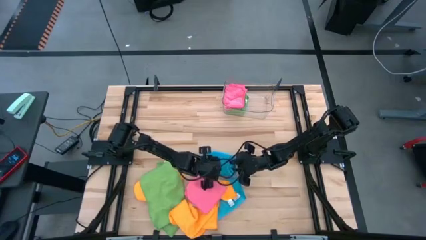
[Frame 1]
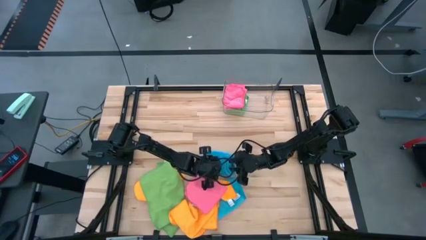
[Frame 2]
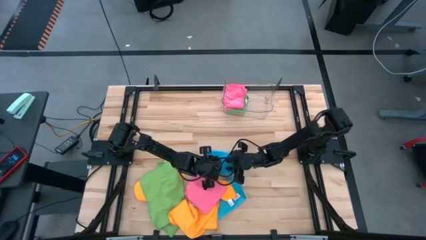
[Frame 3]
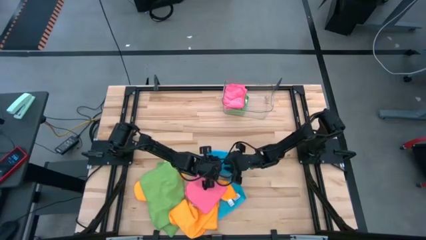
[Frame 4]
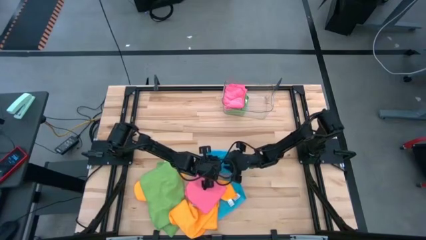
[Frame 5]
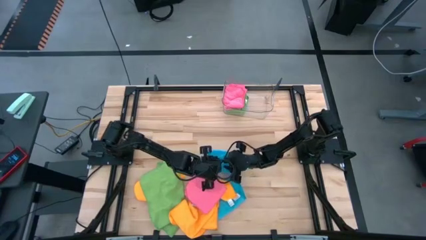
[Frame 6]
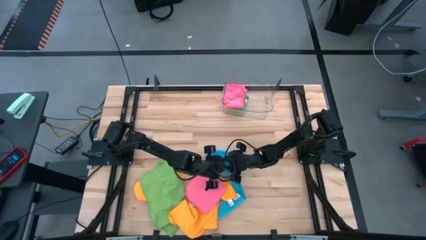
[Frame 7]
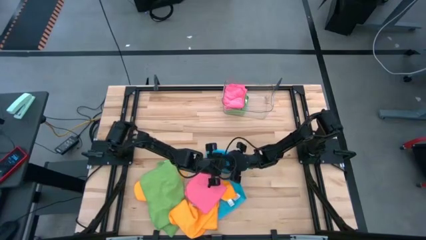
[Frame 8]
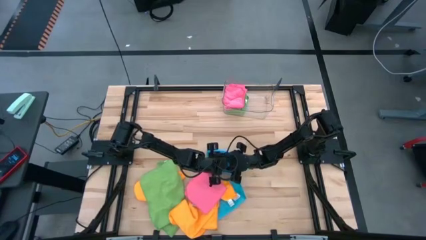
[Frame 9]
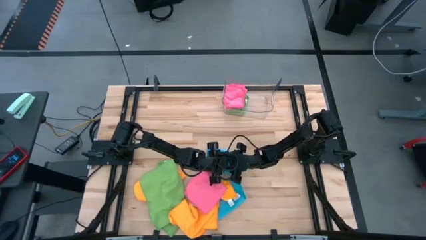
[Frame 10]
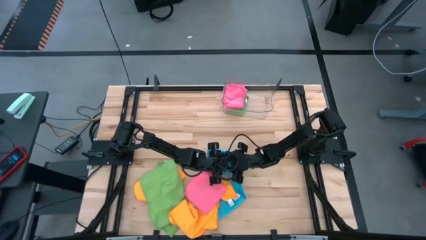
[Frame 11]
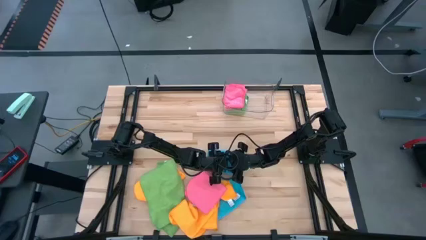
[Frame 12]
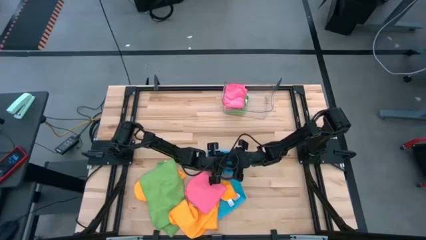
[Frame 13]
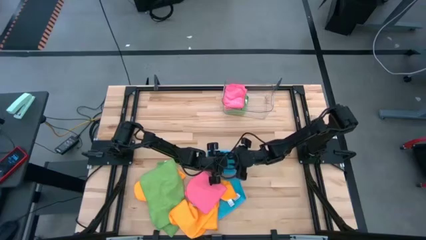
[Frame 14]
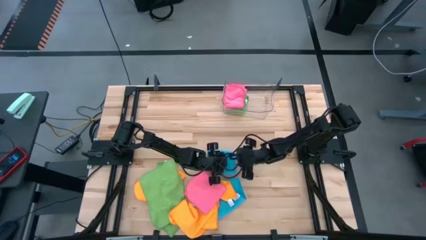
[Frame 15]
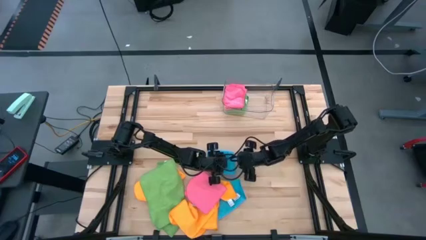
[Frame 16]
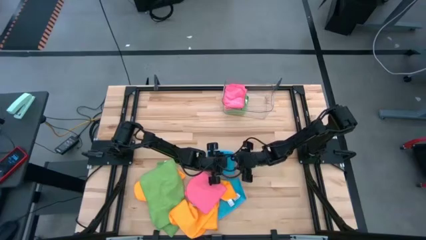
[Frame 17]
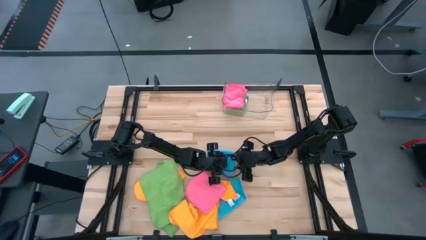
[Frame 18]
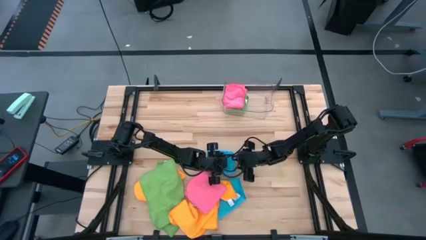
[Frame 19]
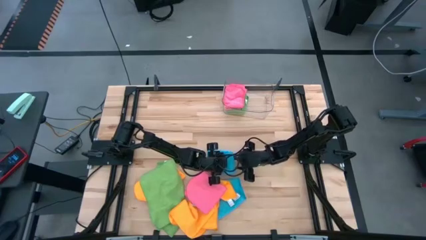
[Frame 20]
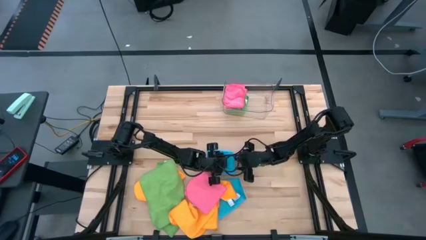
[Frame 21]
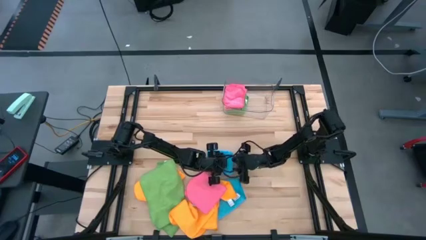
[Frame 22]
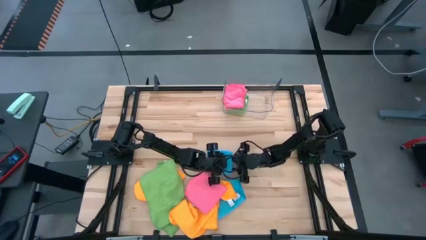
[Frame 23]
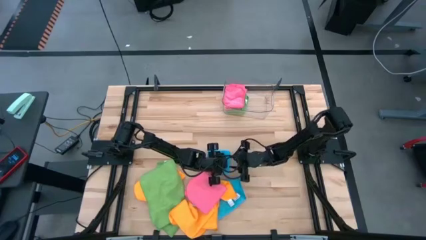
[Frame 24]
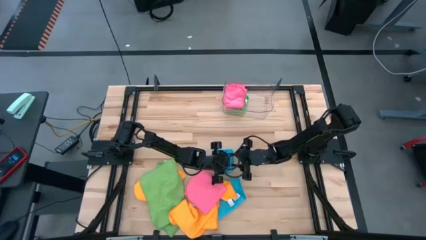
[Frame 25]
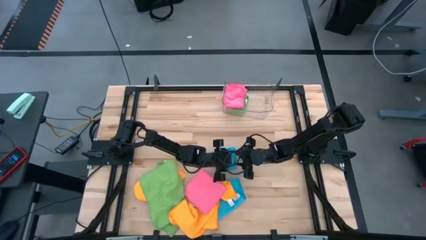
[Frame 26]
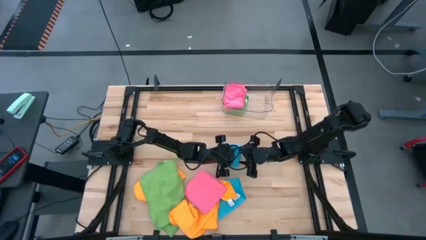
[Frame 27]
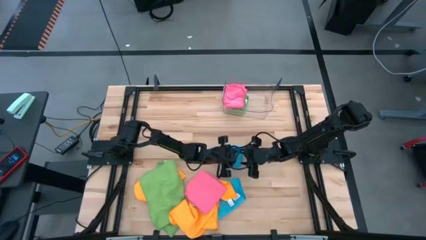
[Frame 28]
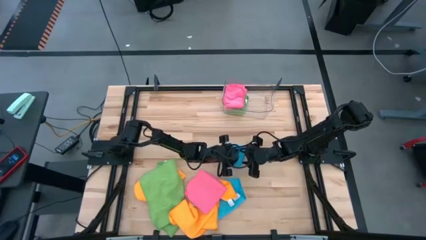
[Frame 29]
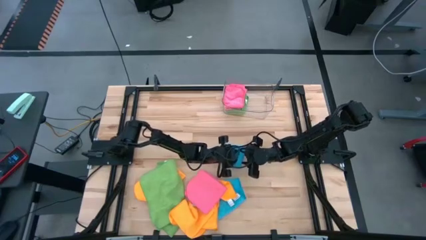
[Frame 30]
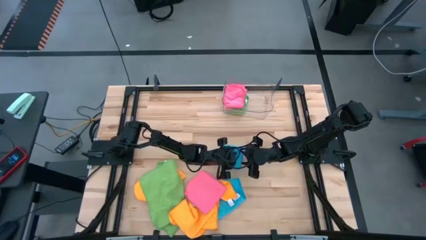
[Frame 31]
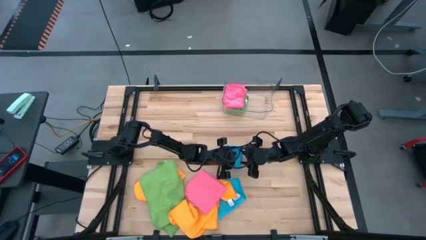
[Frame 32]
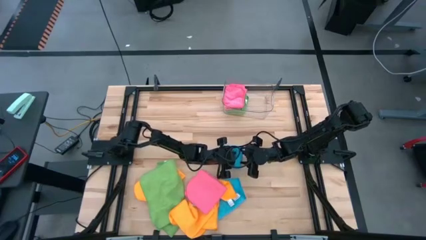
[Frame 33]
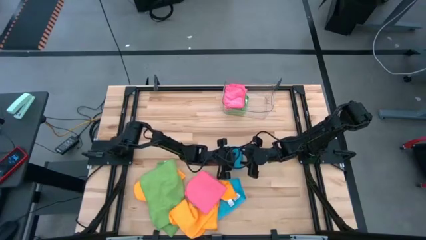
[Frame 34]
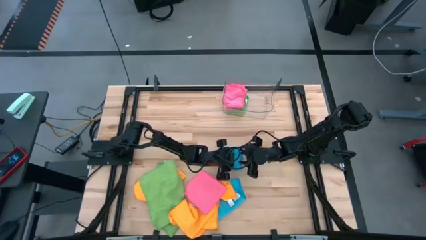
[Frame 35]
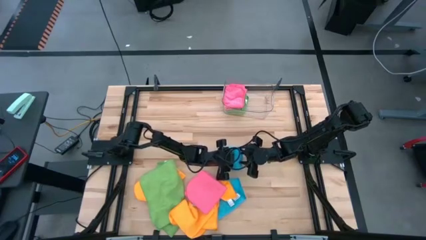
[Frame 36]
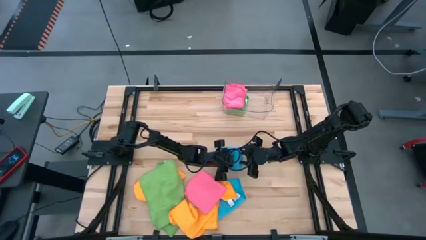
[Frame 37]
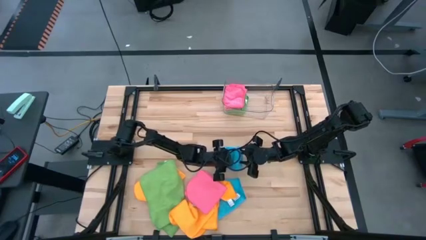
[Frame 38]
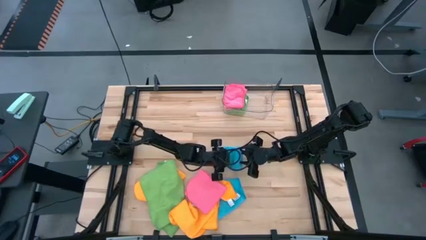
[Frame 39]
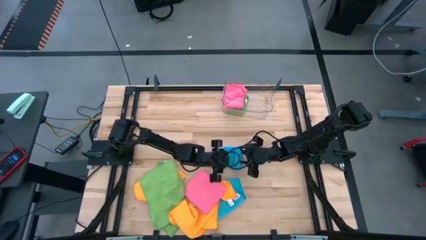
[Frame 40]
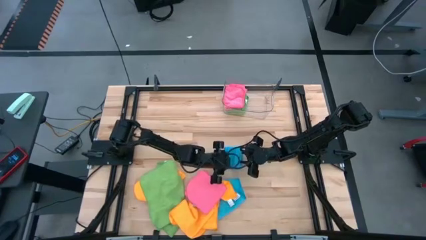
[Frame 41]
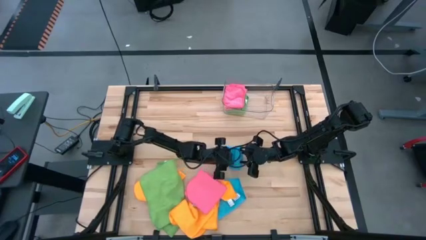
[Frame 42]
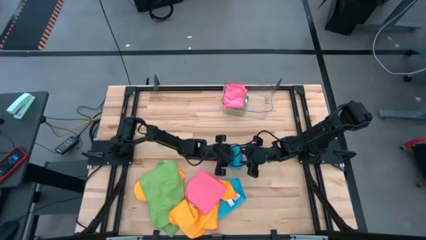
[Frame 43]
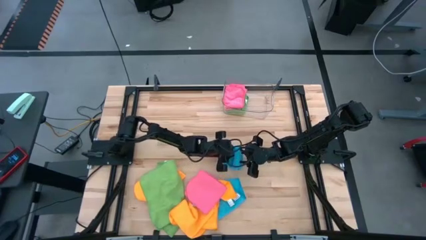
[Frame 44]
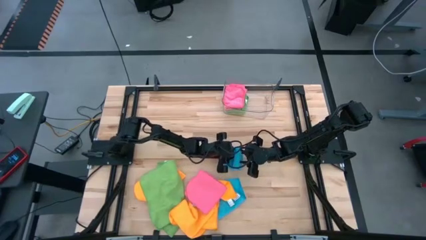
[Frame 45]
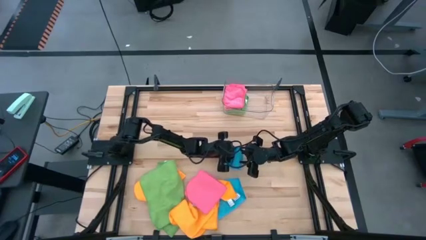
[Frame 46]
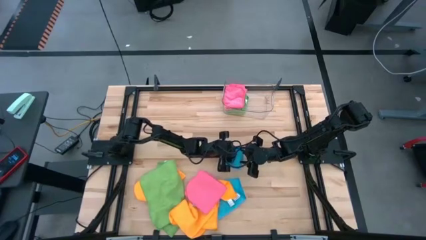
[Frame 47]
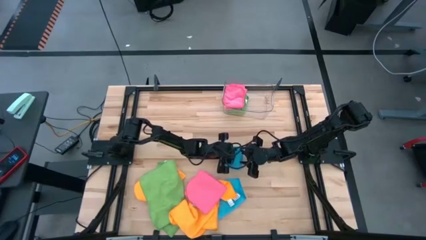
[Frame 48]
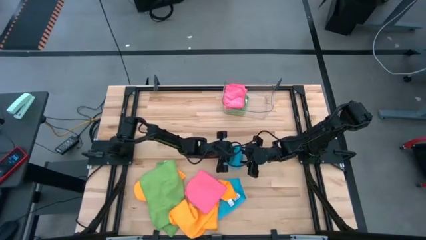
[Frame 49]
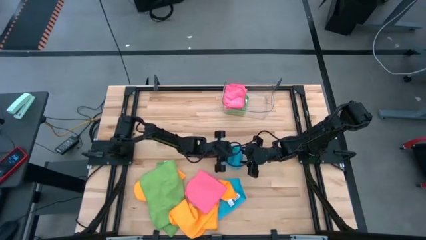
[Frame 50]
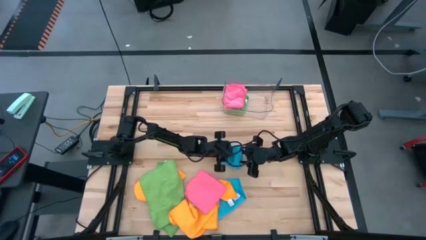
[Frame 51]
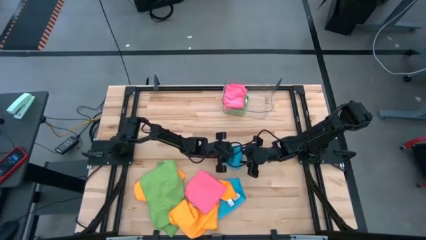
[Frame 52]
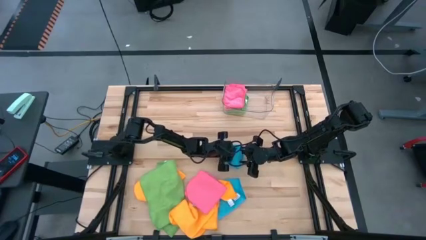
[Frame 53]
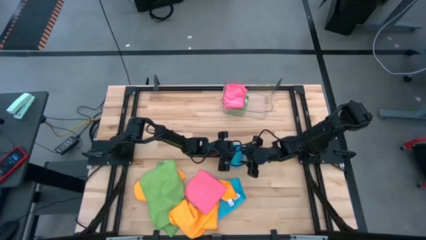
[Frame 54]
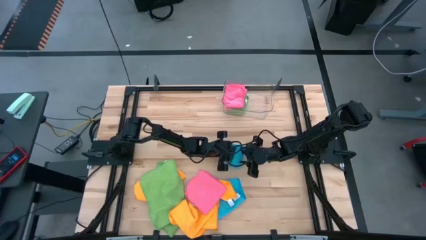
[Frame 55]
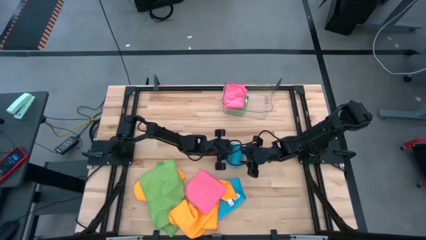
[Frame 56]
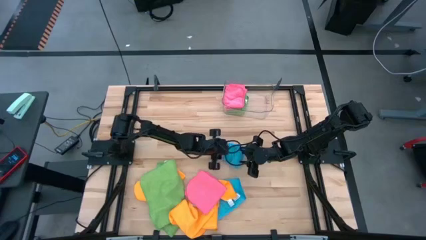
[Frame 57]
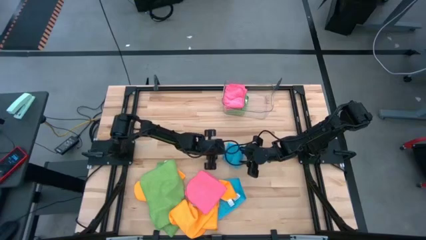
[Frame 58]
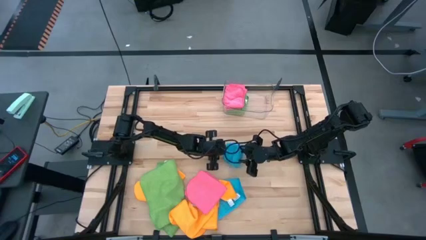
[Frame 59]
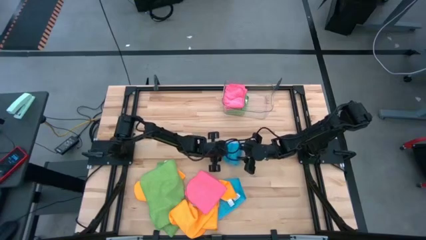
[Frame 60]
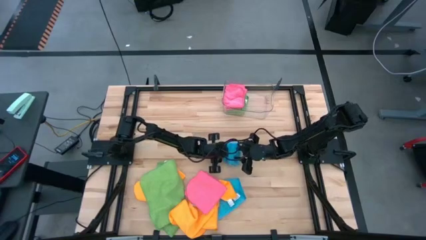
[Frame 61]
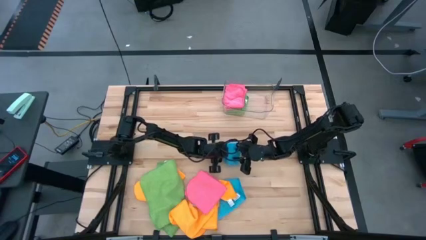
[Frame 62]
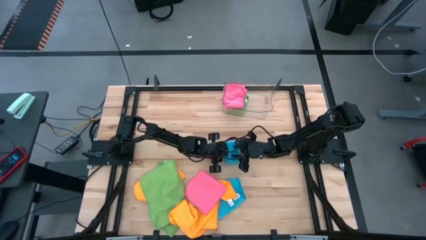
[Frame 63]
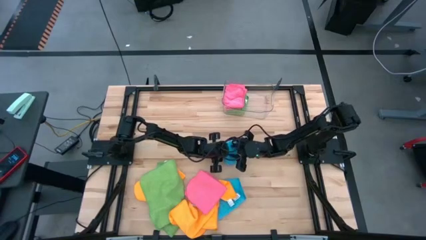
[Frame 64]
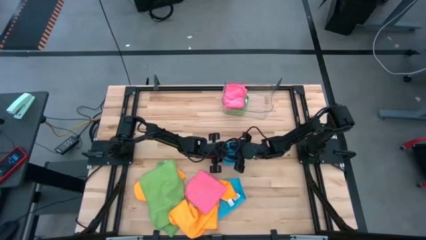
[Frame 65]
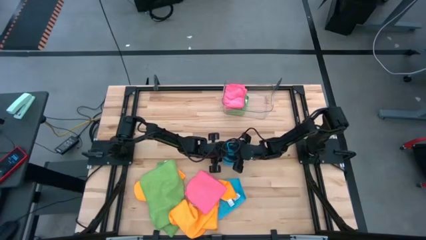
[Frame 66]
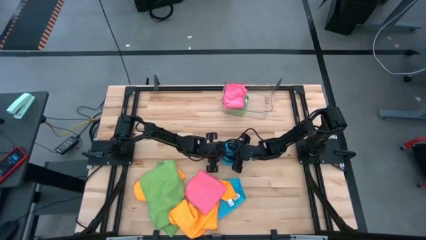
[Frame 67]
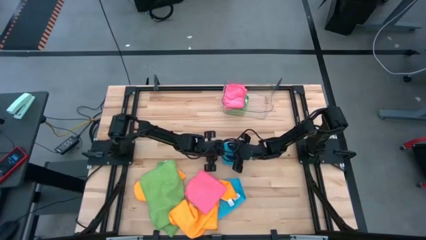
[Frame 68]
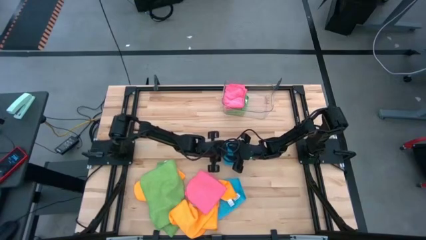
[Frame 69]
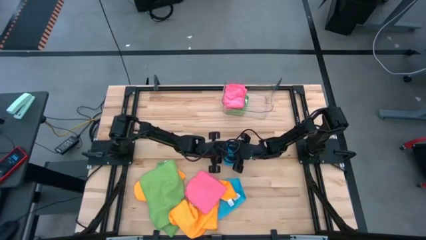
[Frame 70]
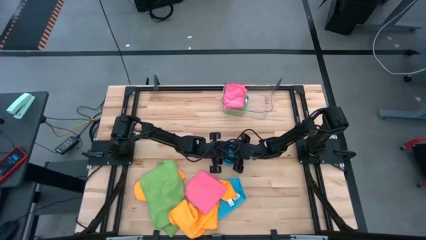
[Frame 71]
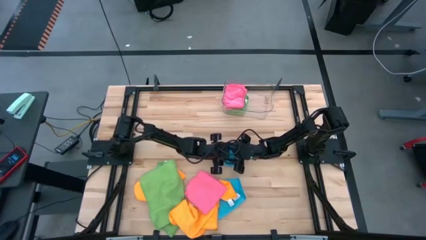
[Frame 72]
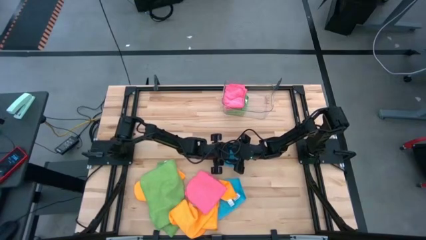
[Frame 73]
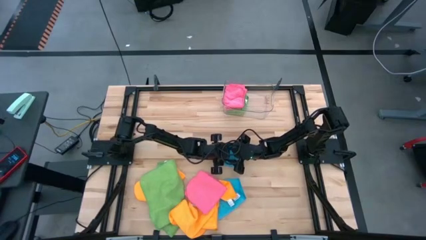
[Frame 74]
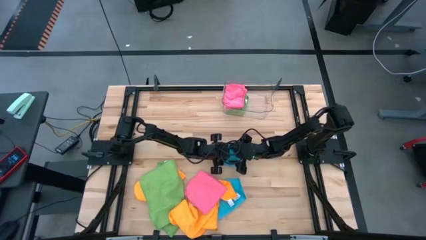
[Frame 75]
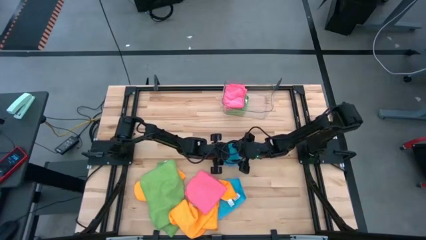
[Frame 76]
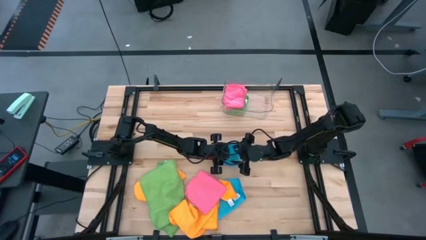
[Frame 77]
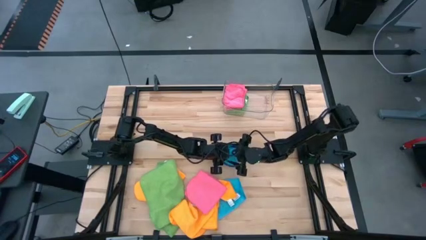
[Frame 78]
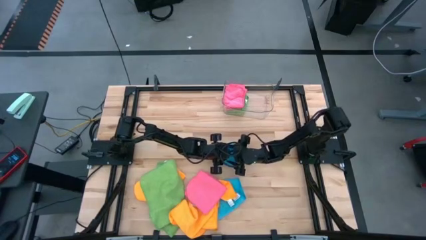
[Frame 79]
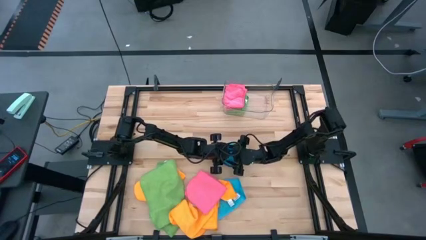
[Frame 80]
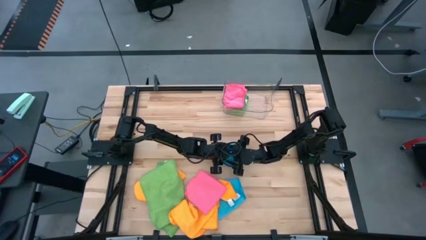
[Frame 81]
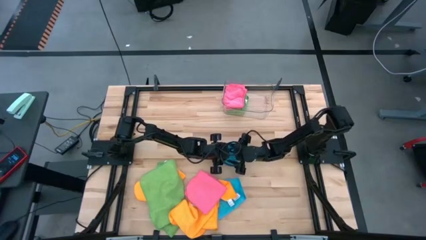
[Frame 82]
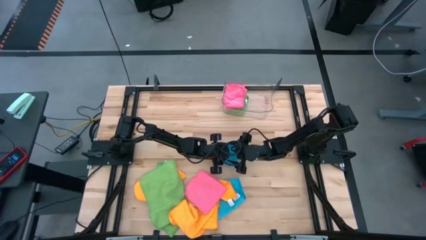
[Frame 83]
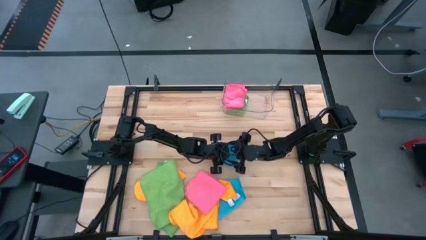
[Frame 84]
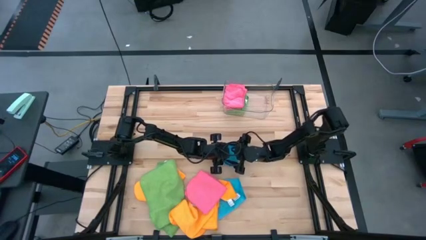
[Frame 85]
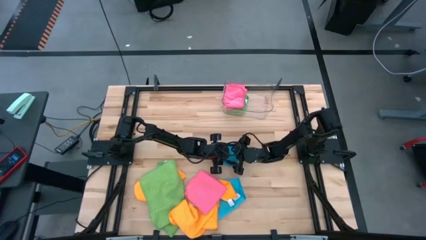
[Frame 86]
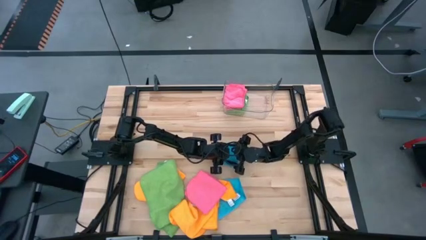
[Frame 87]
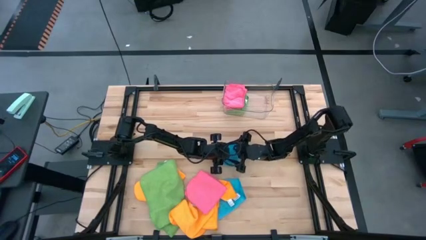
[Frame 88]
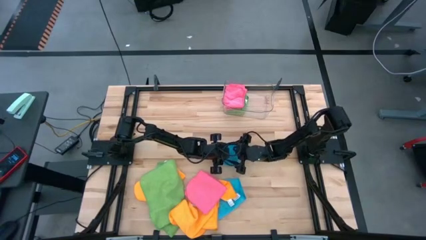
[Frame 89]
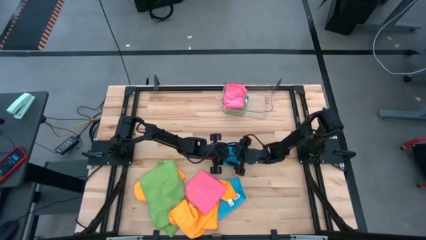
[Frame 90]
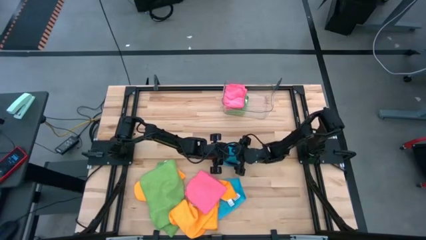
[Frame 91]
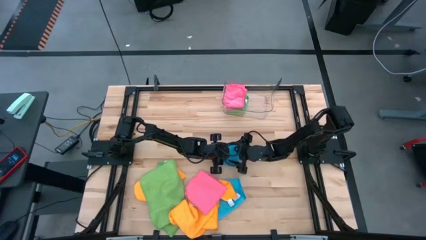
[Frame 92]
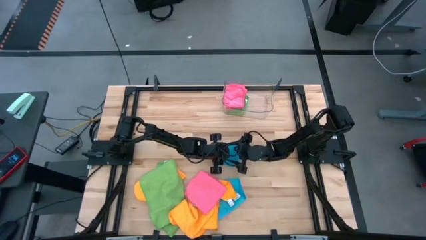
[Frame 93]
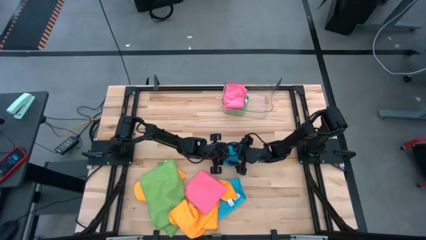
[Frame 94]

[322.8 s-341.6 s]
Task: Fold microfiber towels
Fold the top blue towel
